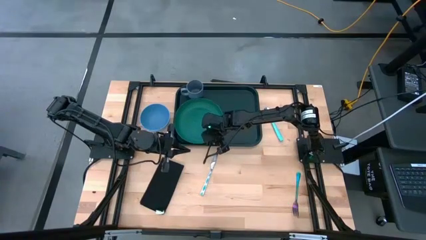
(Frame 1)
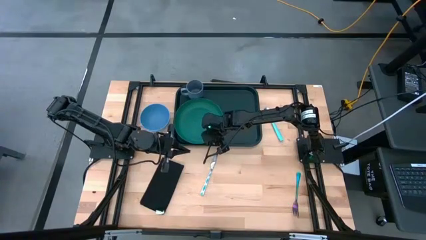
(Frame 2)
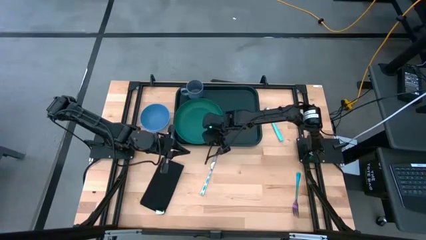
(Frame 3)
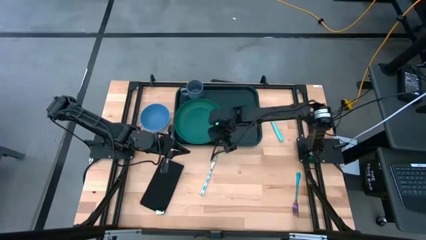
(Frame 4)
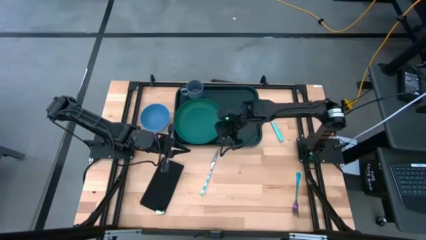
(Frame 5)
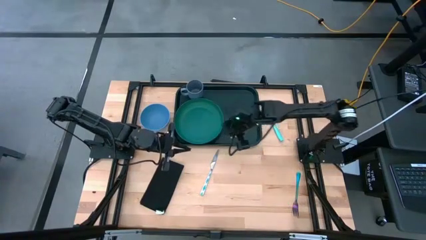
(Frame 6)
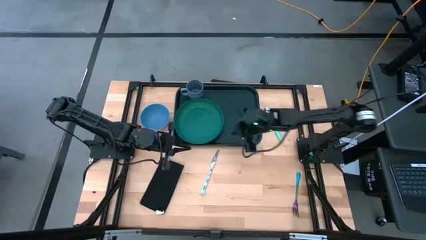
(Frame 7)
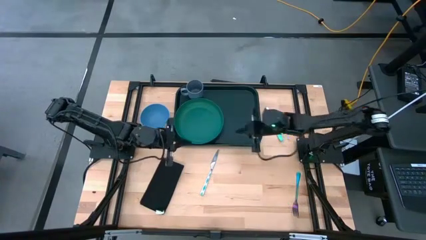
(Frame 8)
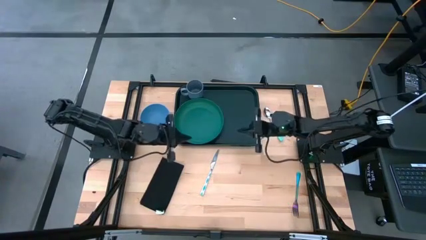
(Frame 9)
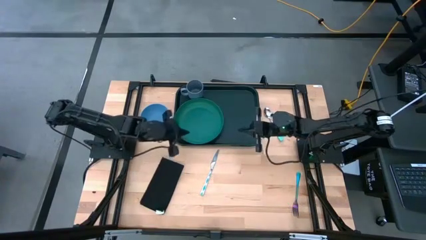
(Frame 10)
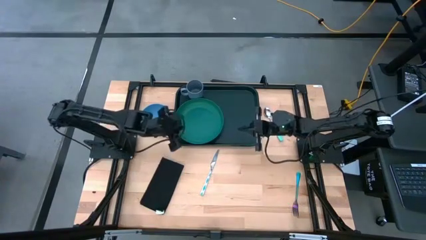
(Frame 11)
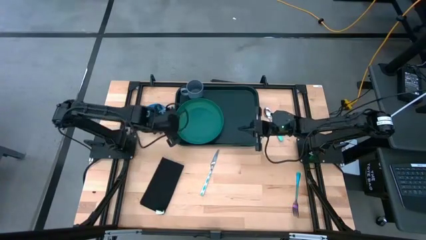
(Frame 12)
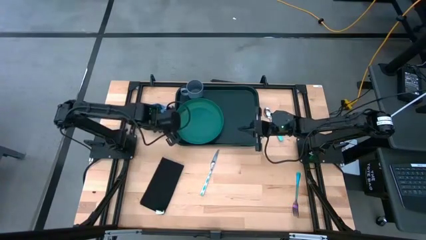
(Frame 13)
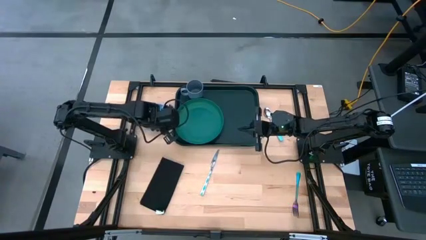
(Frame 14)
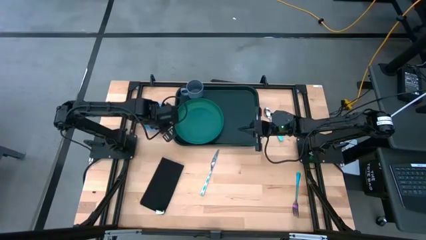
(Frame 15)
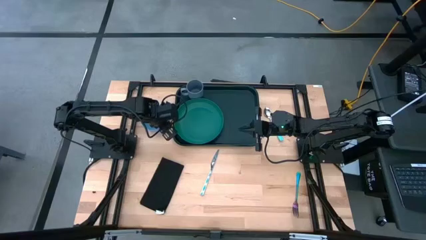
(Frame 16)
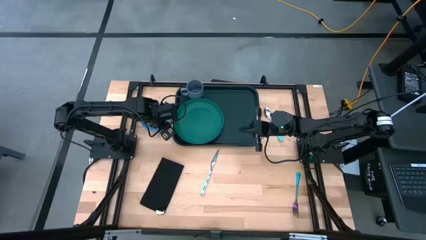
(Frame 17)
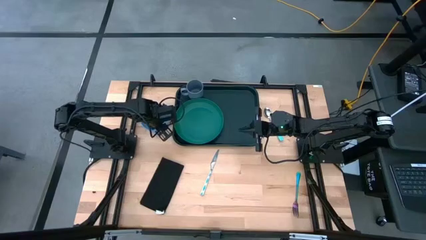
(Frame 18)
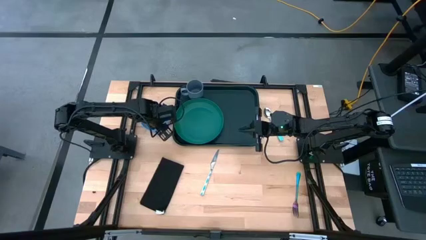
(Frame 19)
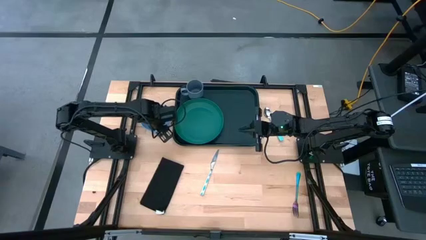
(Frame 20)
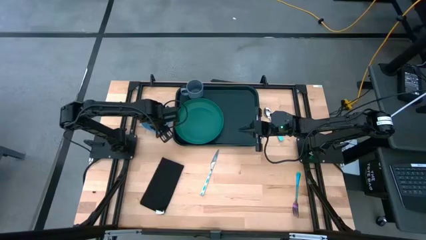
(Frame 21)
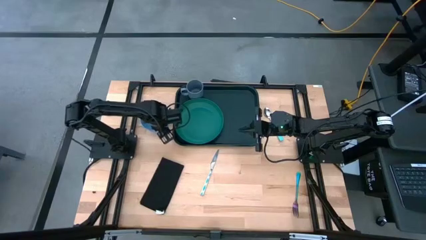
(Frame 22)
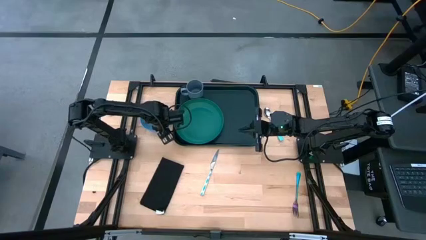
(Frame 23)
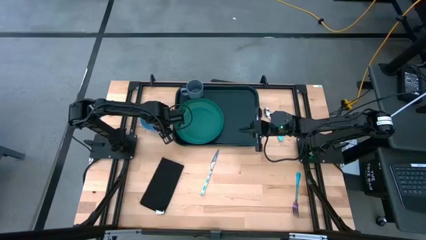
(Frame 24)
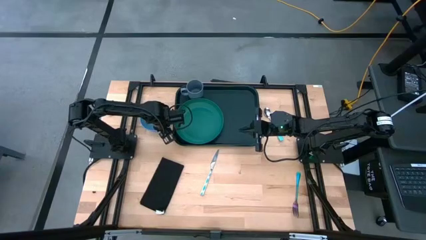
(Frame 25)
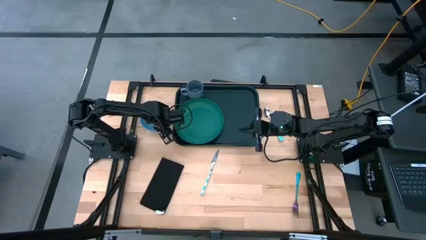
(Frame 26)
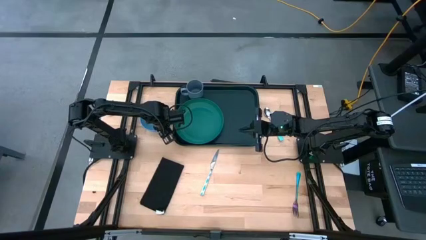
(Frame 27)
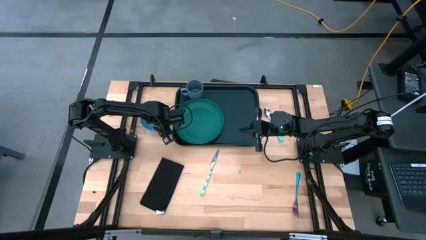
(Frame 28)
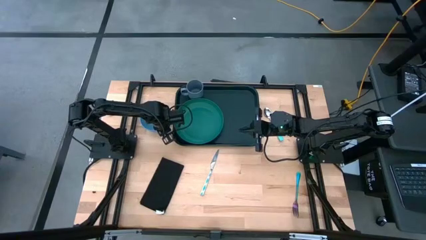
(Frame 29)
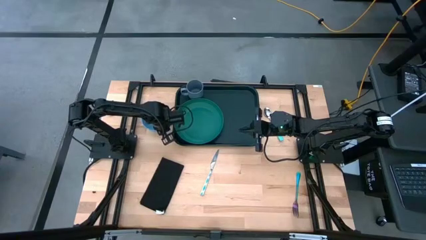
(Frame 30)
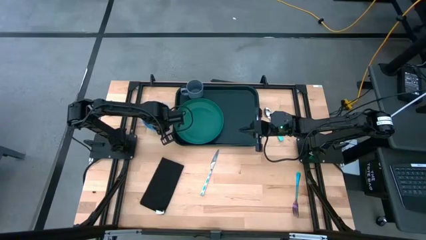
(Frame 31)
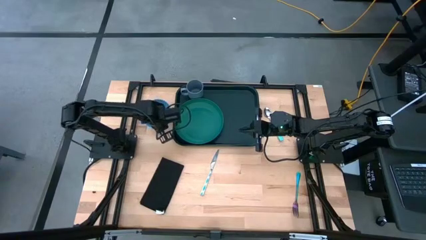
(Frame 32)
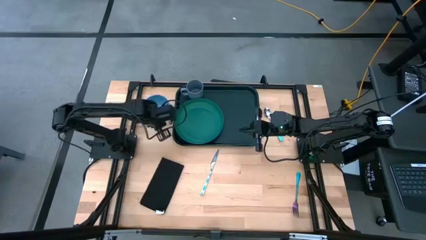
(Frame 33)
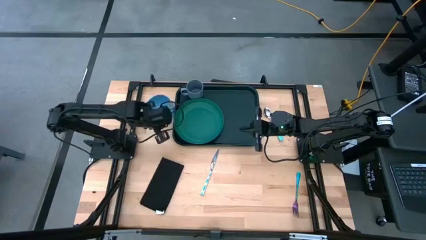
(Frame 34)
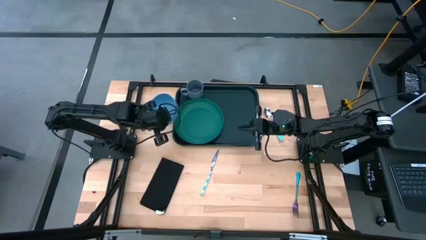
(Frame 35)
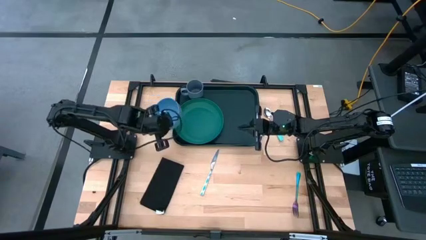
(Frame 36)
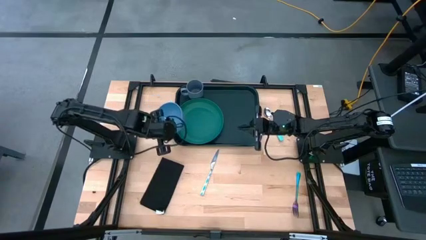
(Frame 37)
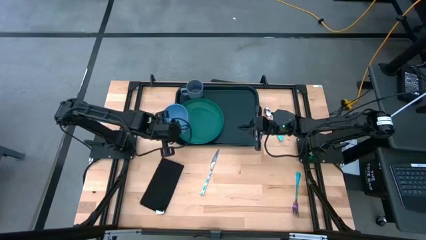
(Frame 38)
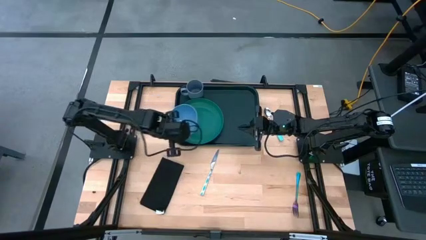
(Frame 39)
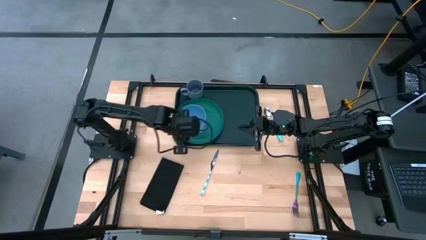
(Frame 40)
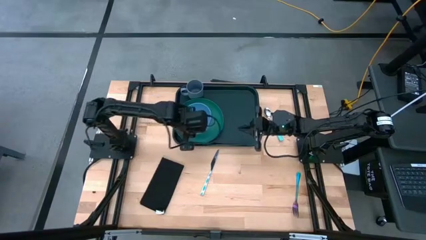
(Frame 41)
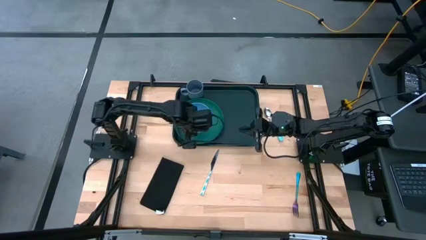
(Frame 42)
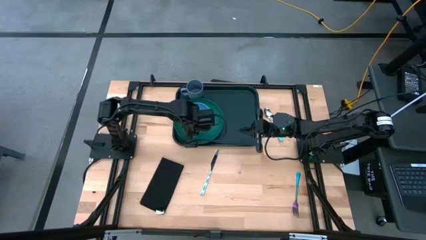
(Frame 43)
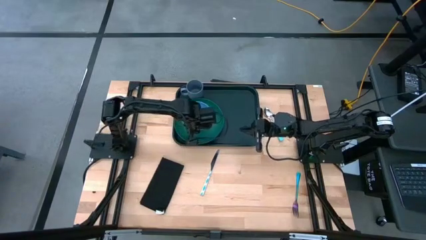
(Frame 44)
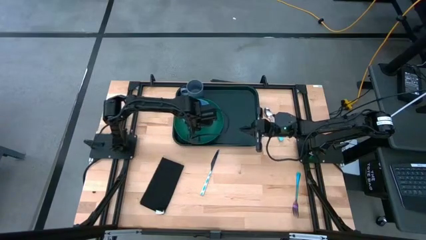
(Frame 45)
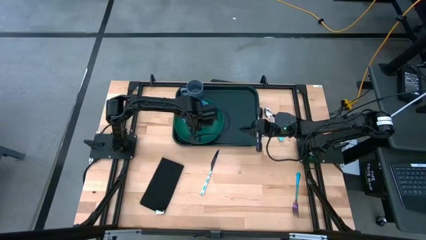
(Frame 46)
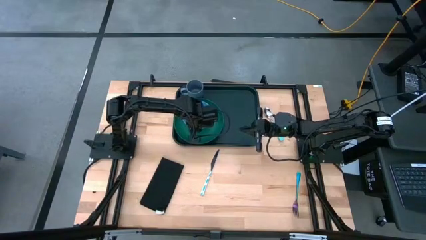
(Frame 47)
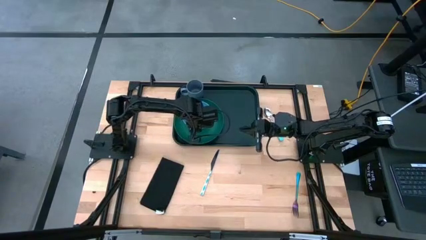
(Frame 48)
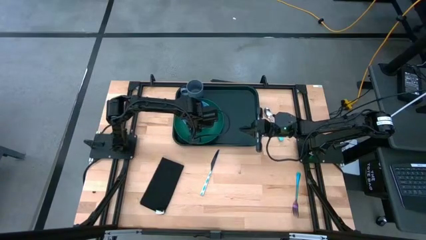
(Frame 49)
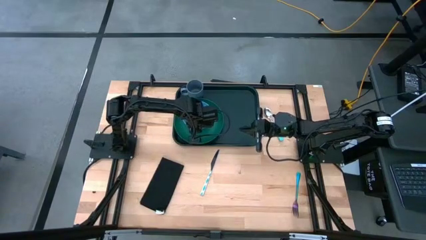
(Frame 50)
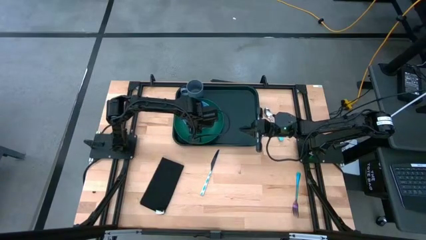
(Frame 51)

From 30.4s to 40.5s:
Task: Set up tray
Put the bowl on top of the green plate on the green tray
